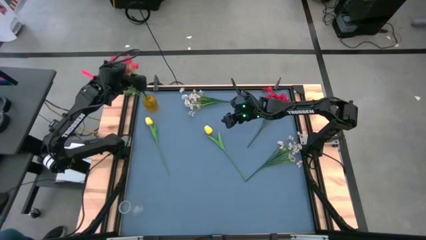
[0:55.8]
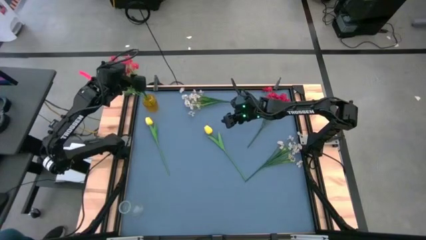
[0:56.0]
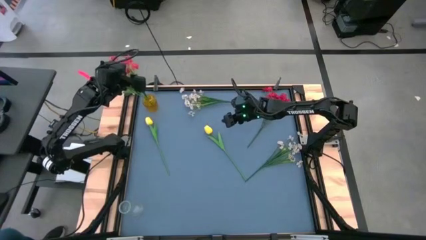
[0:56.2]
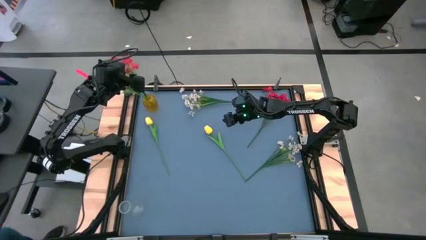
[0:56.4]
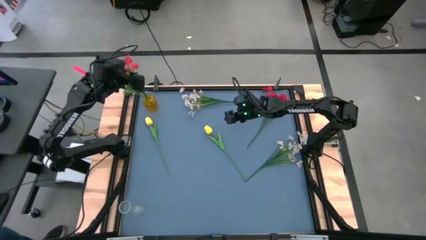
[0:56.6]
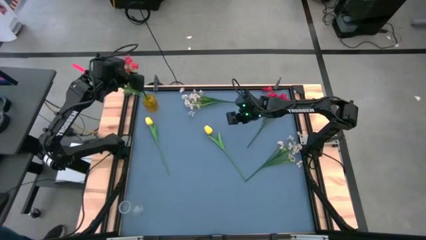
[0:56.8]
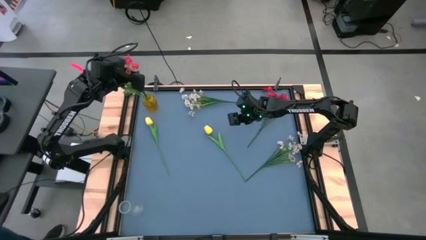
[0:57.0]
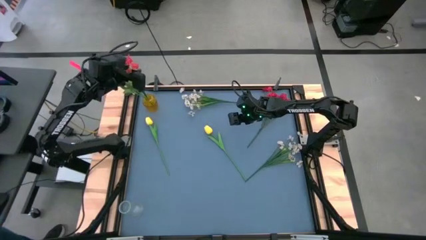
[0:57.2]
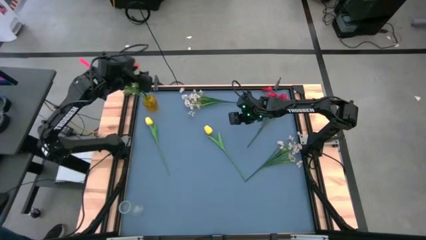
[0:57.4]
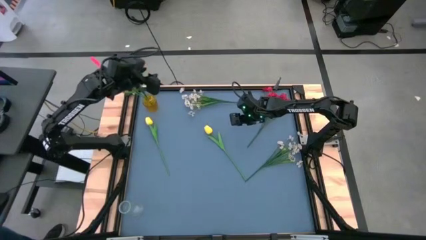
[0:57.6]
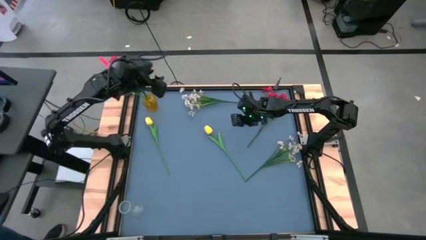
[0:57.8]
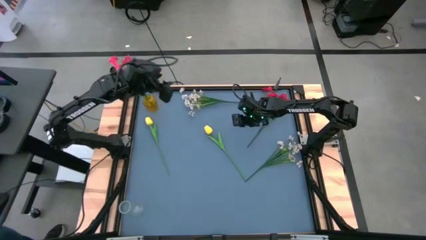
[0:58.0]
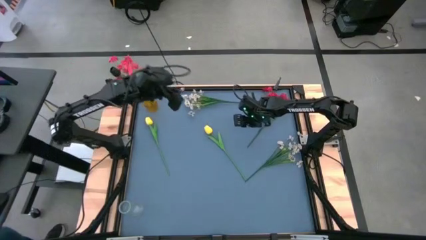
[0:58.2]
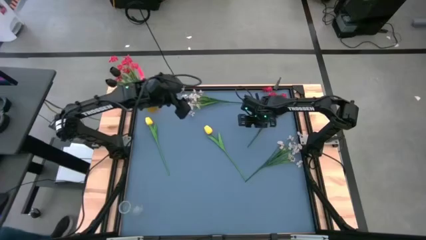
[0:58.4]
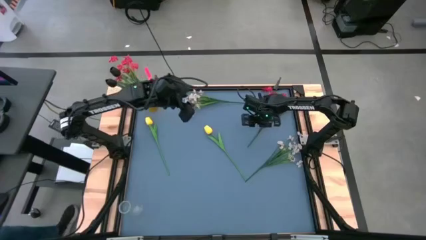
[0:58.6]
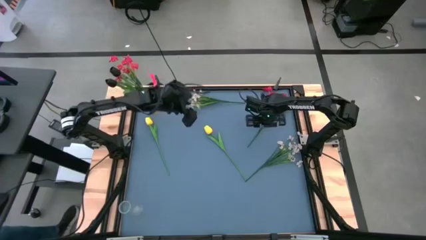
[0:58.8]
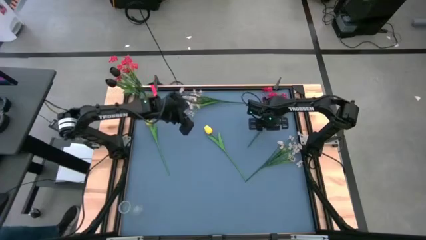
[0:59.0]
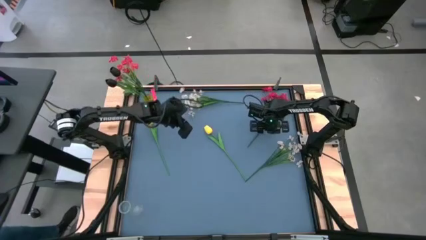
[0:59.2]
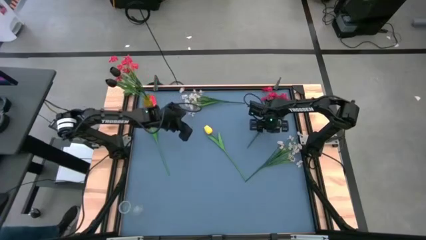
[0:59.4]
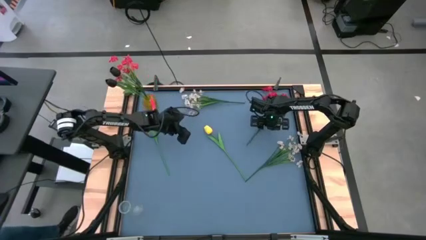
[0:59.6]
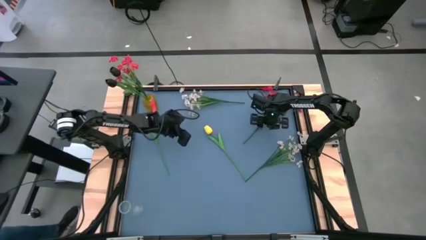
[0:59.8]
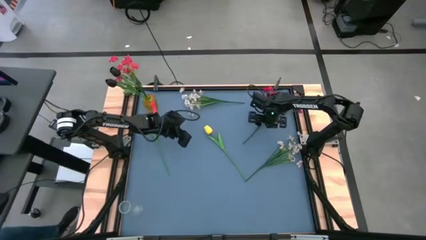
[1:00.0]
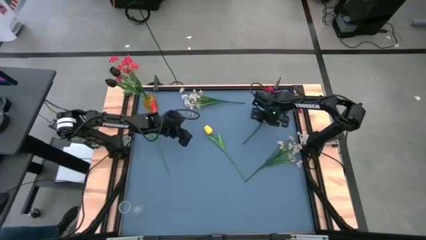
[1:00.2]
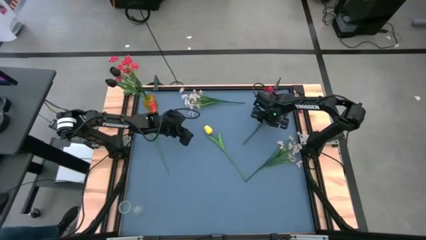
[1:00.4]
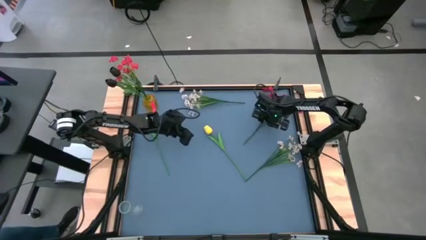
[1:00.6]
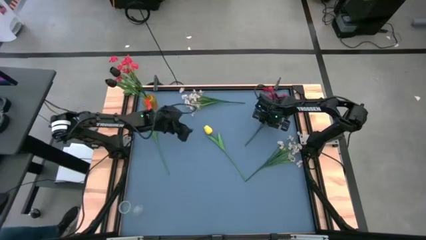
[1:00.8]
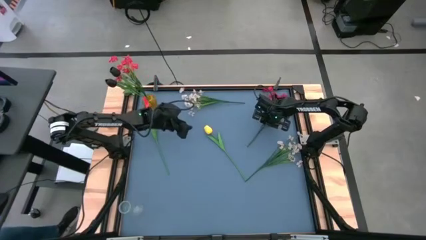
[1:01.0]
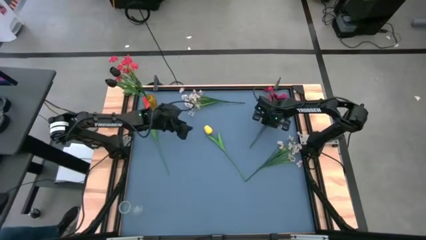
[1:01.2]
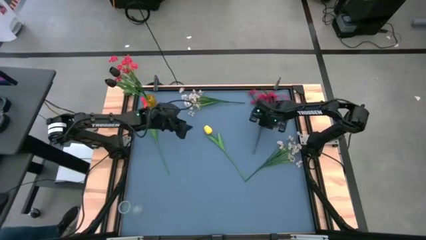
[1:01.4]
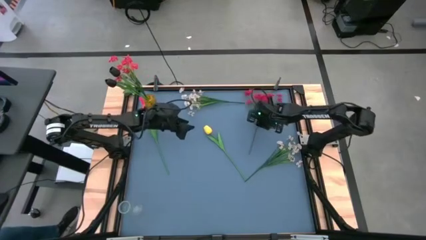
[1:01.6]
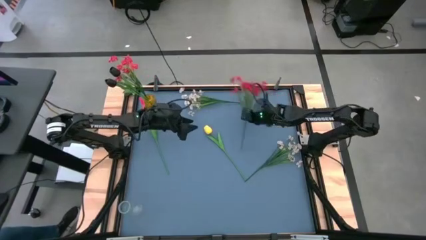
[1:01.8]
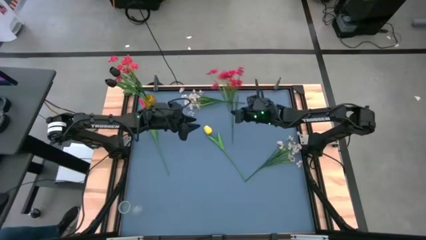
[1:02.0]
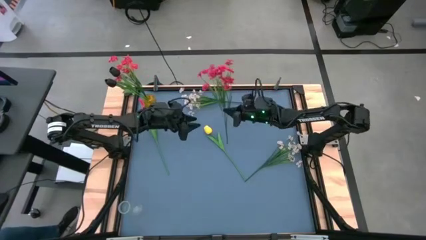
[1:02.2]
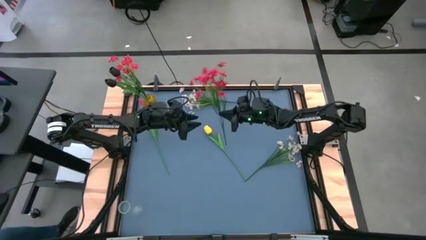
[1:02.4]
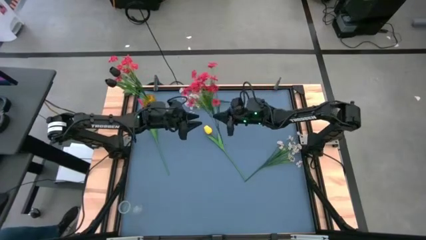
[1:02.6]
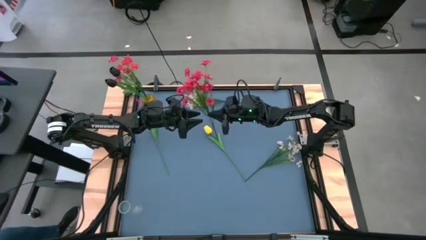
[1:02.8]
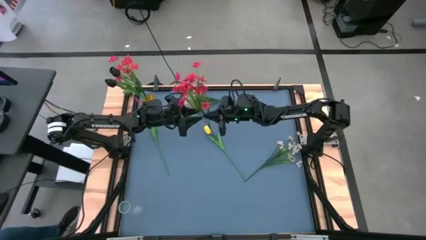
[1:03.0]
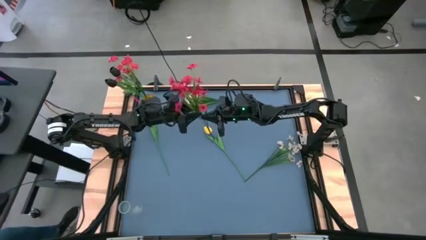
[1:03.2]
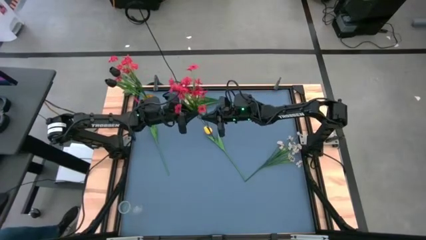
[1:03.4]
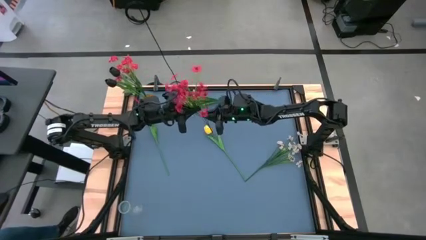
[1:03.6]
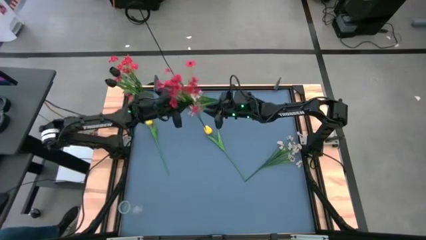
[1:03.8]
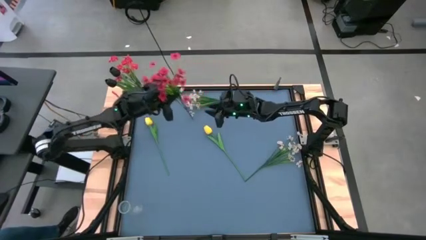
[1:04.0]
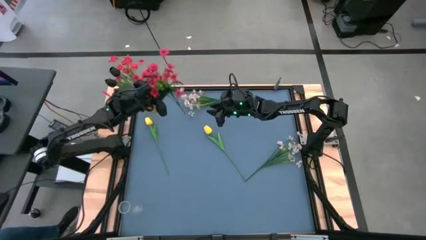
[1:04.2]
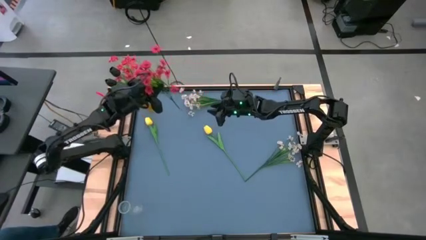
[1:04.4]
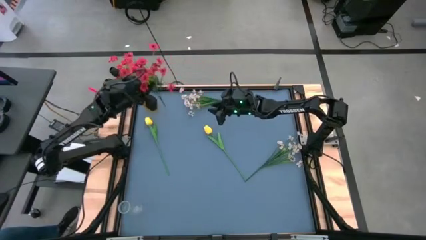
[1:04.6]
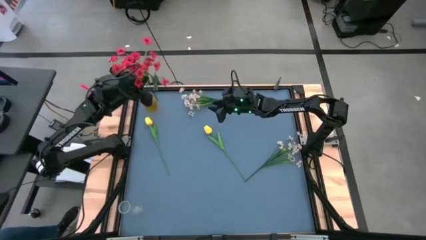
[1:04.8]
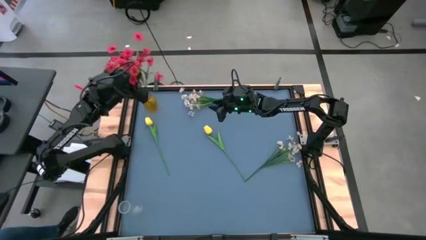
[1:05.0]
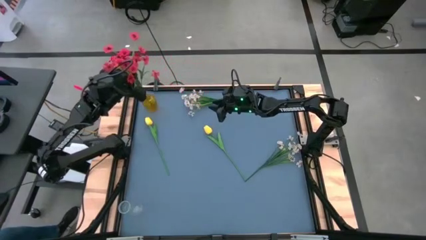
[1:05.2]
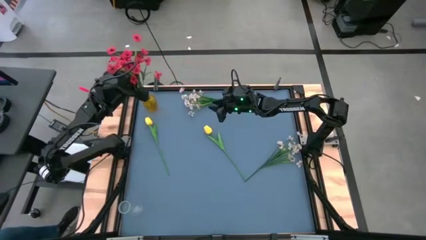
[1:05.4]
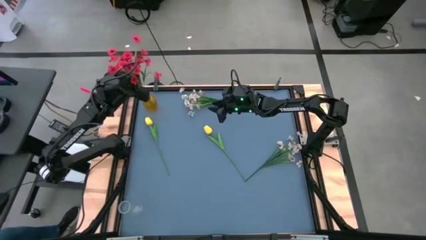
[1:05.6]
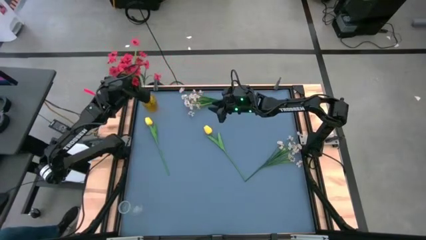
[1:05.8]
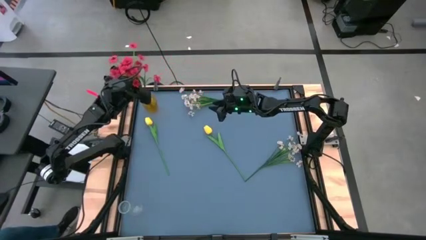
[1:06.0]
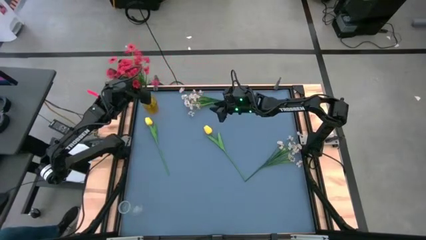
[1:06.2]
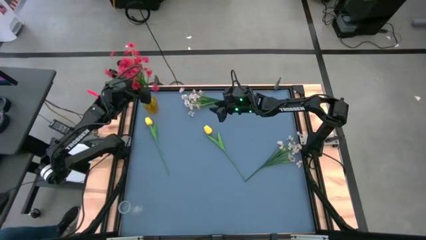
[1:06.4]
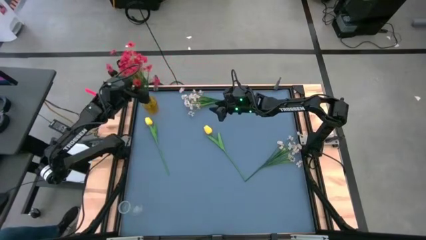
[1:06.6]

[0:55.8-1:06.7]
Task: Sort flowers into vase by color
Put the red flowers into the yellow vase
